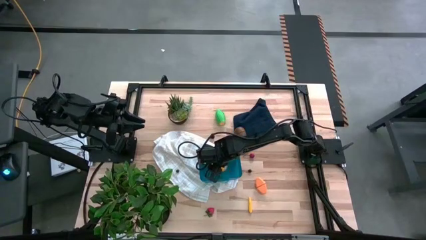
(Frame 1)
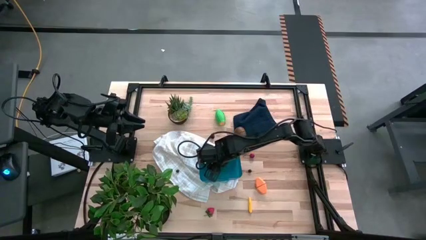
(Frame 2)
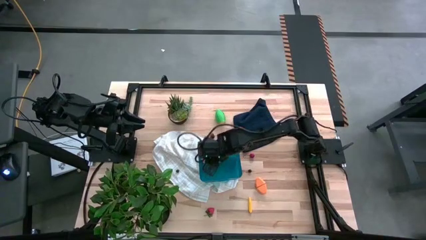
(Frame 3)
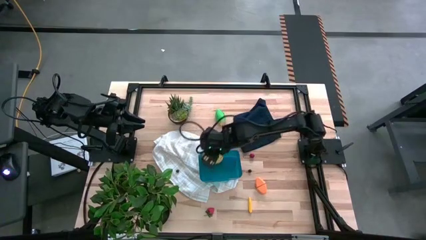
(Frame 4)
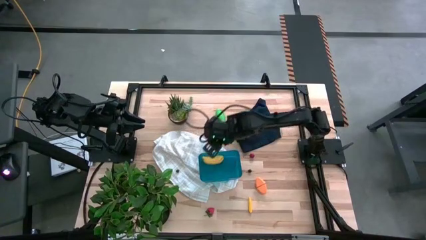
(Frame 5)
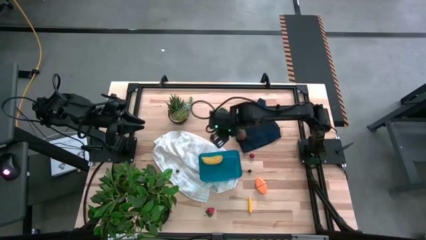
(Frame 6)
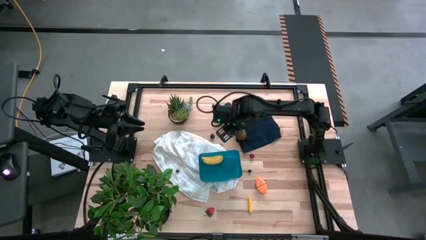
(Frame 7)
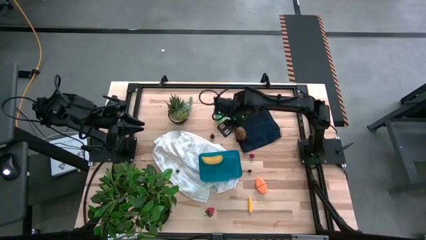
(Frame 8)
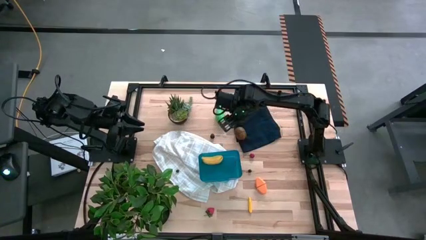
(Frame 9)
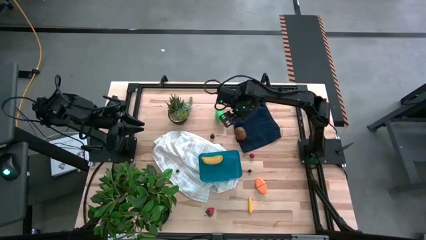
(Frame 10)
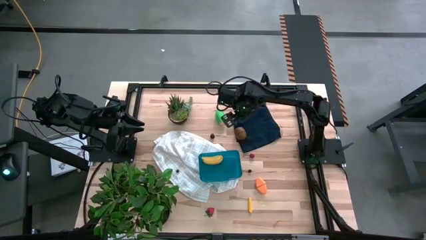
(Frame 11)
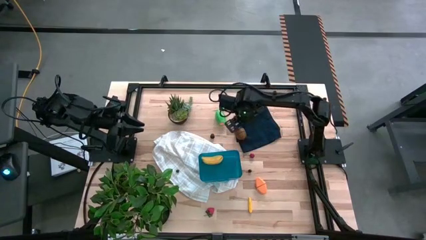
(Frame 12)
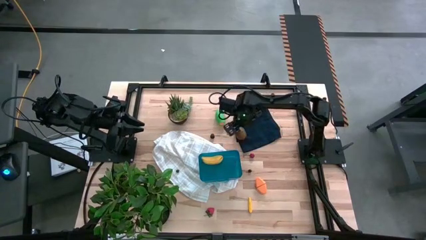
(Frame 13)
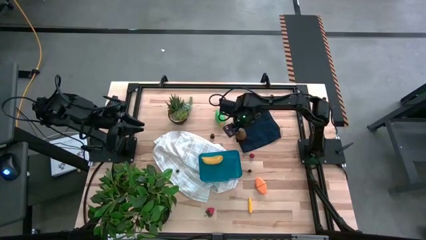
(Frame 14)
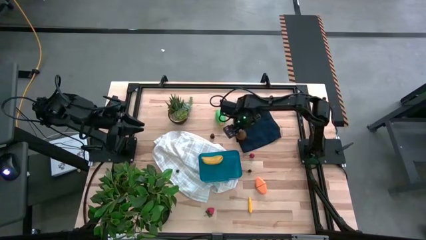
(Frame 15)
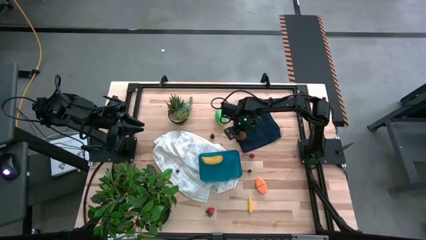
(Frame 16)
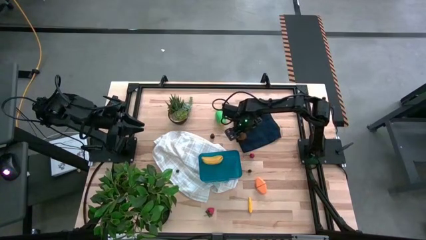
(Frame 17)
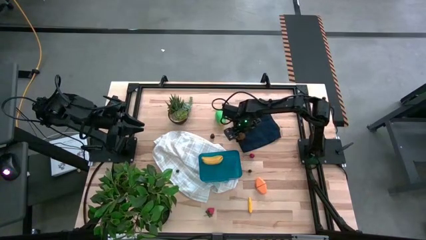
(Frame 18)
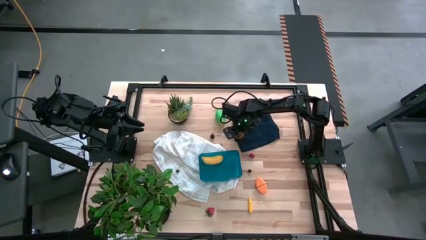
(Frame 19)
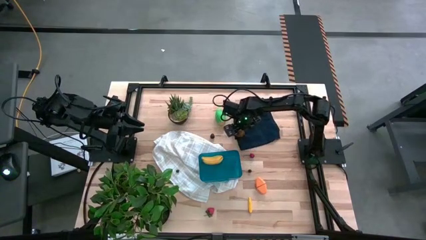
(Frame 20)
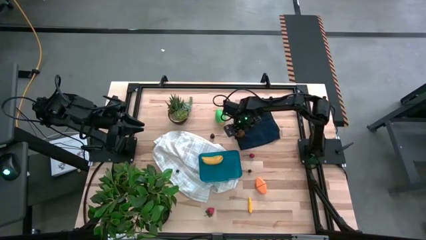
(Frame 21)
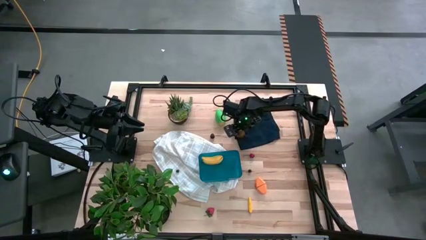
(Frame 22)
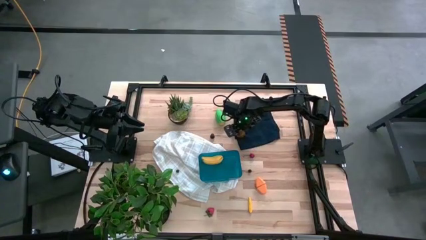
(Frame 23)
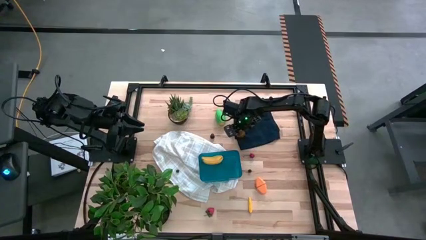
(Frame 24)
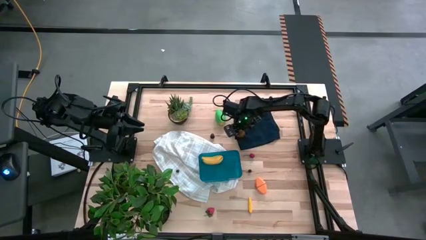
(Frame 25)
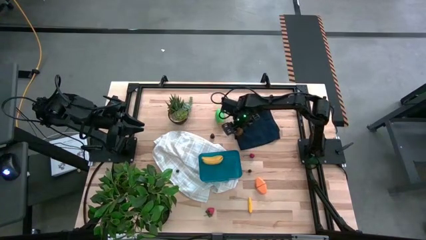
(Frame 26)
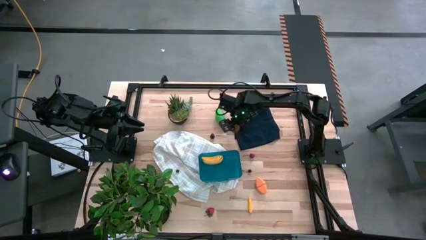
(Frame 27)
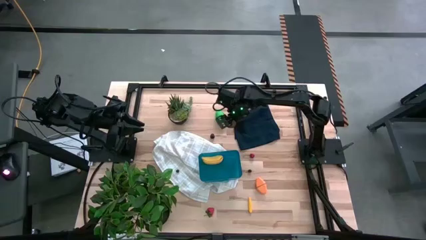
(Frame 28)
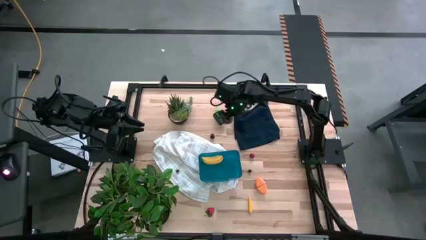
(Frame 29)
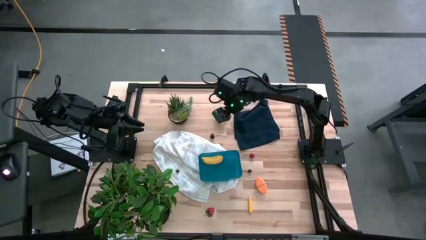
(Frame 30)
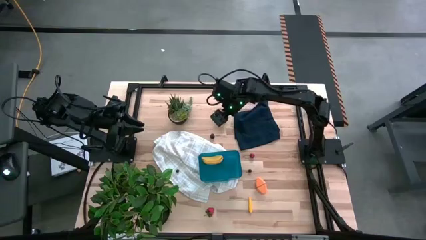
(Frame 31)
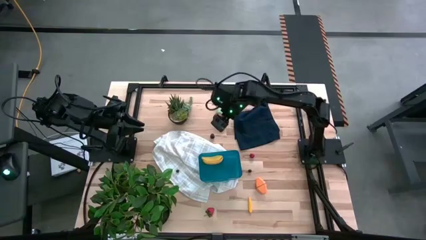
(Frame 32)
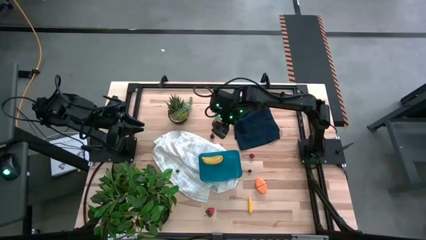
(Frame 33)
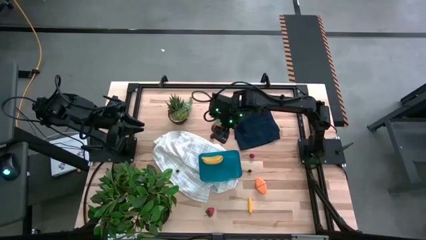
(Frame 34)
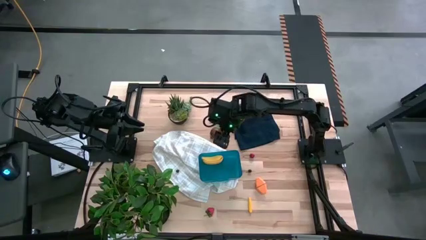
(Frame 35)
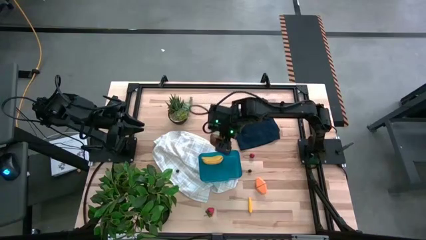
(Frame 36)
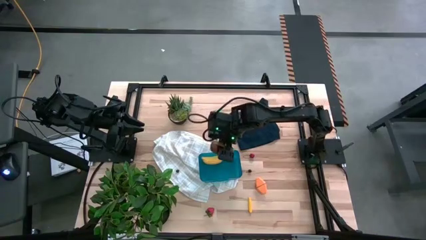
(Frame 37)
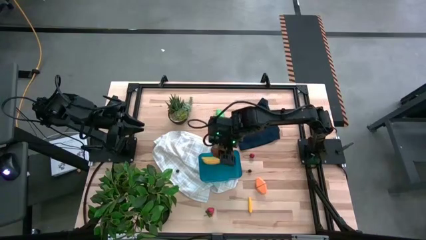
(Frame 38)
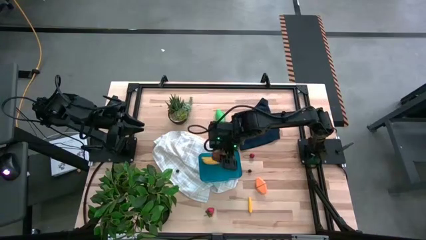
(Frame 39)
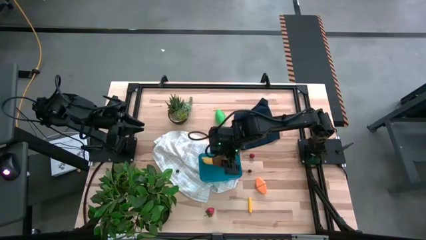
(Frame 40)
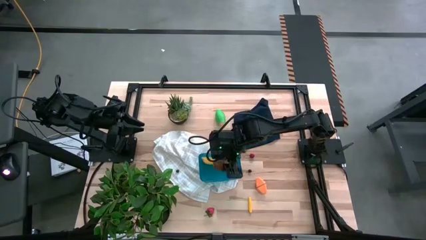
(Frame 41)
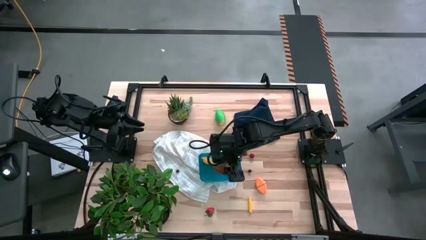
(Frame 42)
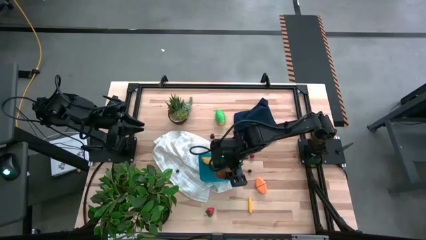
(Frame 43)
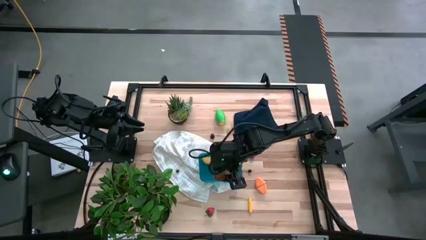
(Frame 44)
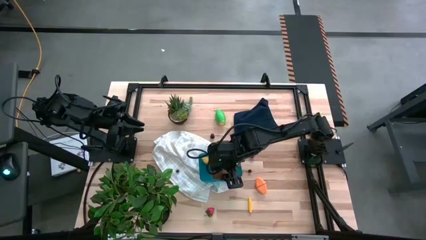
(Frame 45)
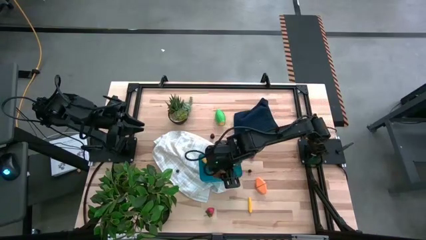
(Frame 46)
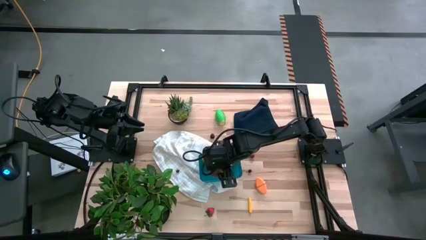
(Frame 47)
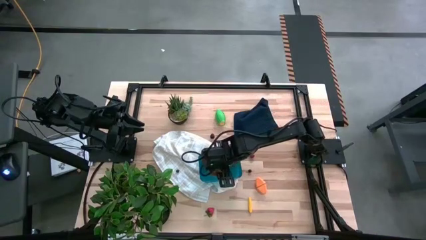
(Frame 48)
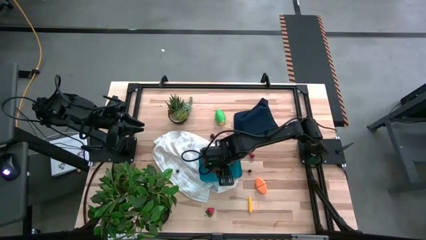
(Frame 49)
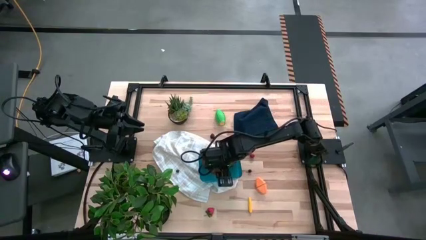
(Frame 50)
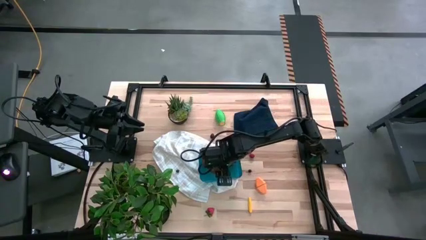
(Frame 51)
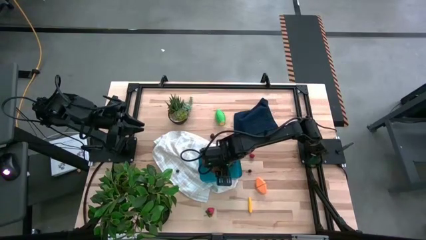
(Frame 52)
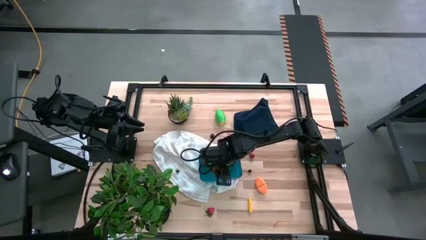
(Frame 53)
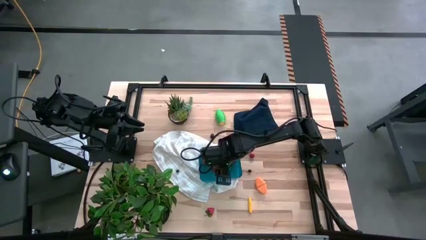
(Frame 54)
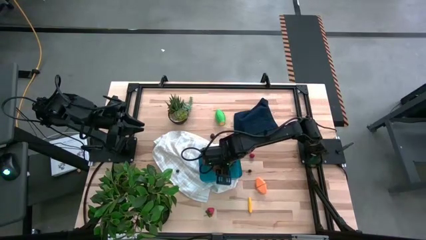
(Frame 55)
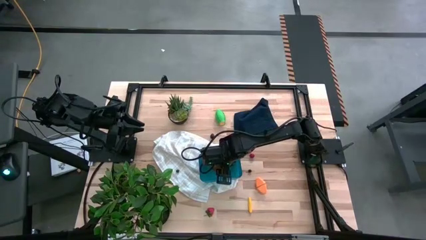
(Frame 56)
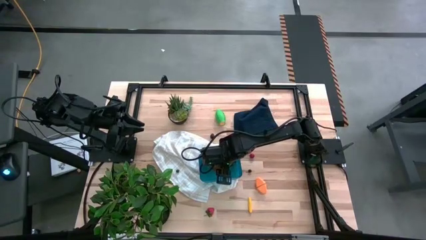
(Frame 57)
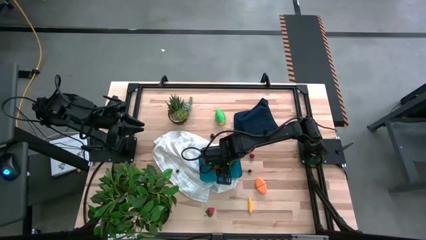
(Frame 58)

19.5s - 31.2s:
Task: Pick and placing Produce into tupperware
Put the brown kiwi into the blue bin
